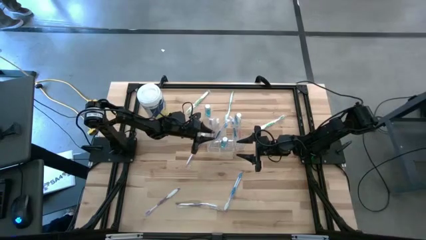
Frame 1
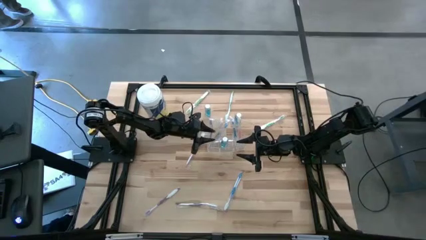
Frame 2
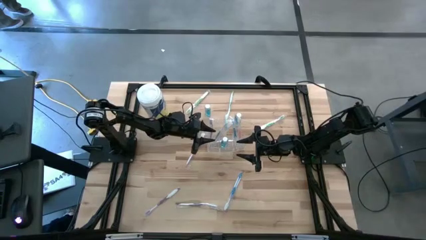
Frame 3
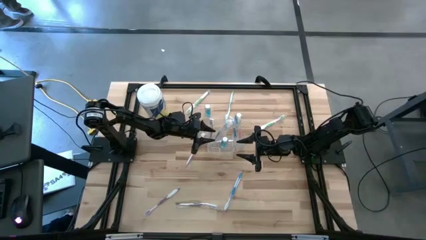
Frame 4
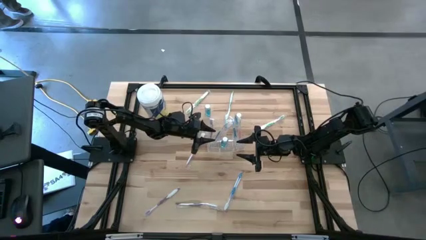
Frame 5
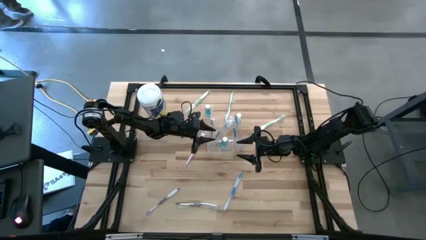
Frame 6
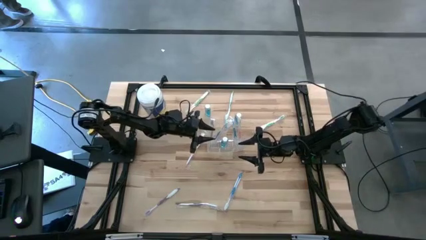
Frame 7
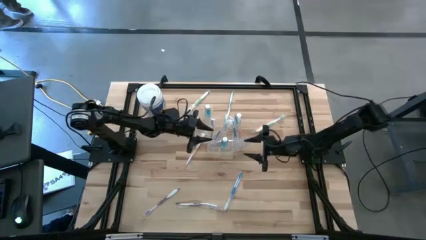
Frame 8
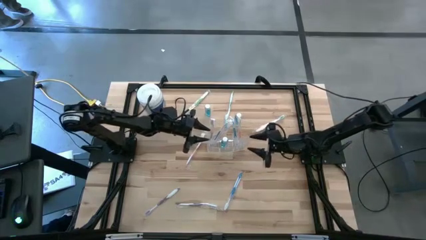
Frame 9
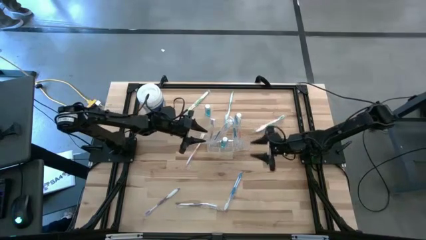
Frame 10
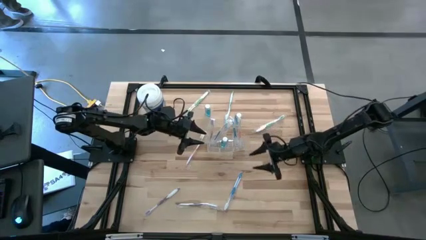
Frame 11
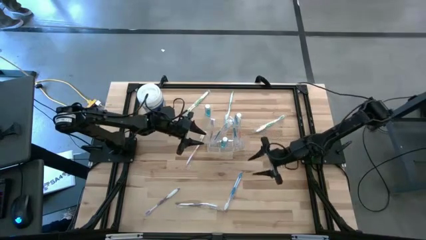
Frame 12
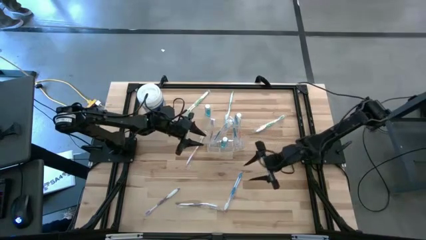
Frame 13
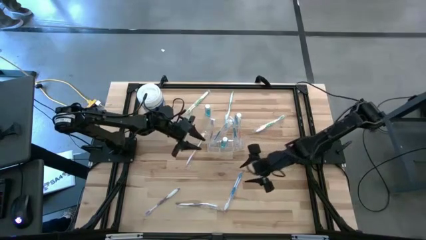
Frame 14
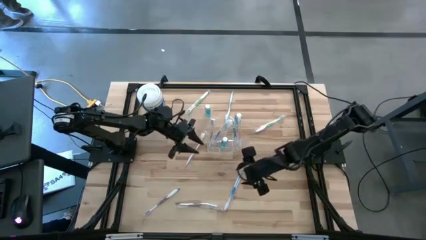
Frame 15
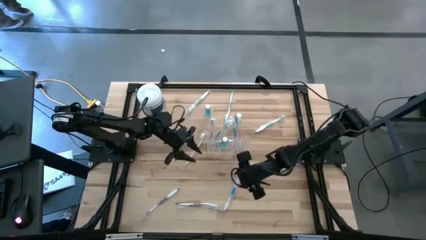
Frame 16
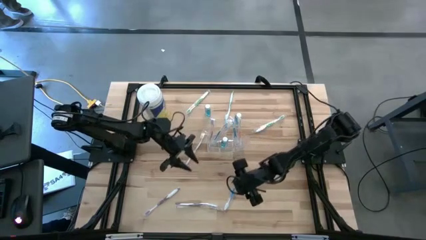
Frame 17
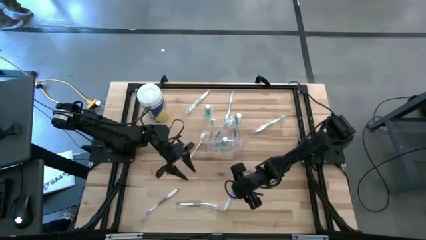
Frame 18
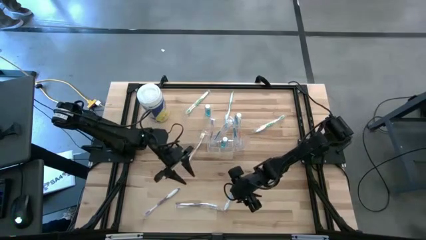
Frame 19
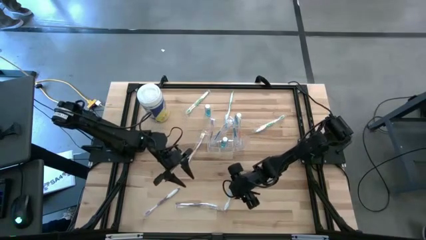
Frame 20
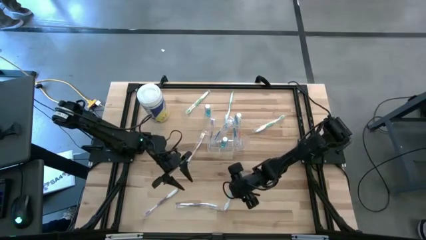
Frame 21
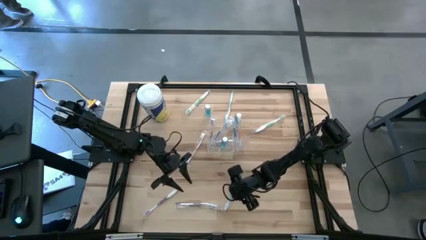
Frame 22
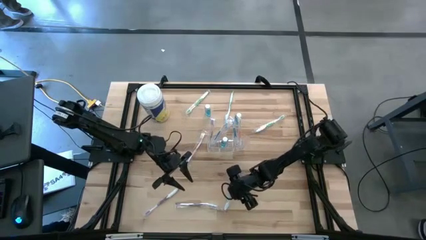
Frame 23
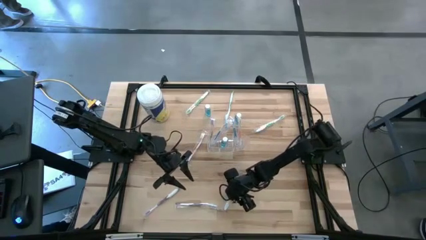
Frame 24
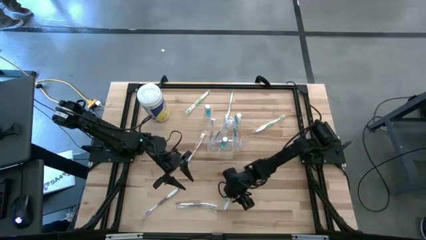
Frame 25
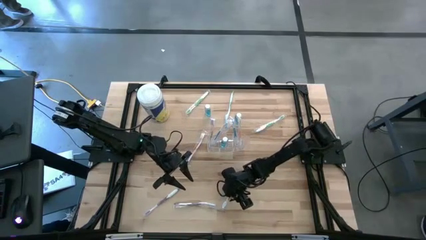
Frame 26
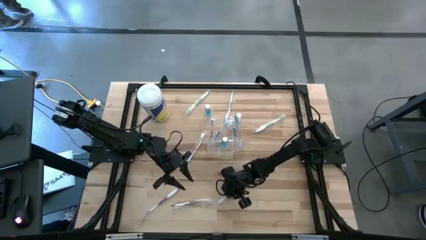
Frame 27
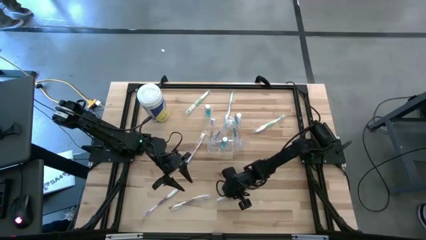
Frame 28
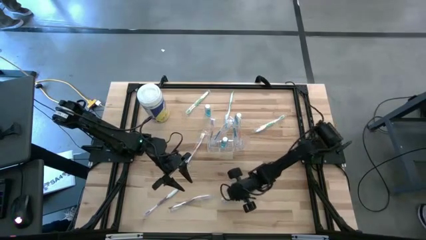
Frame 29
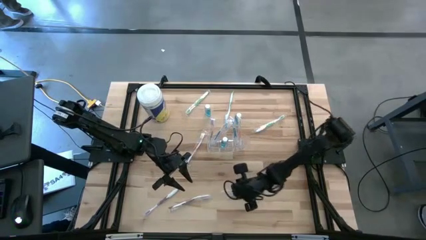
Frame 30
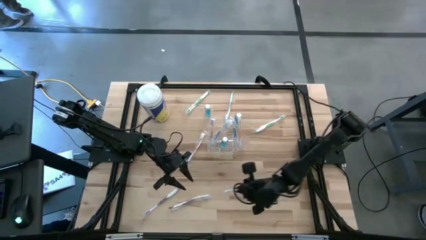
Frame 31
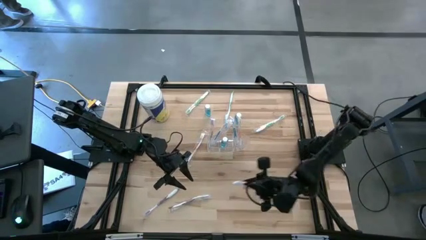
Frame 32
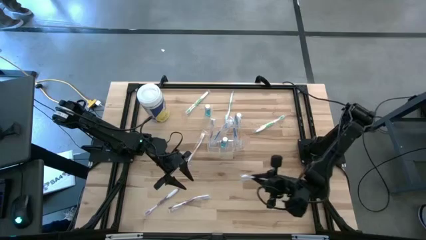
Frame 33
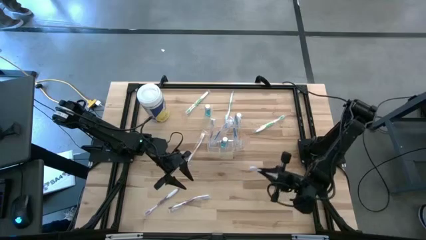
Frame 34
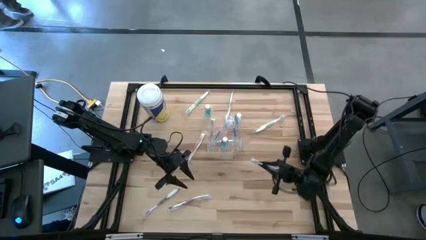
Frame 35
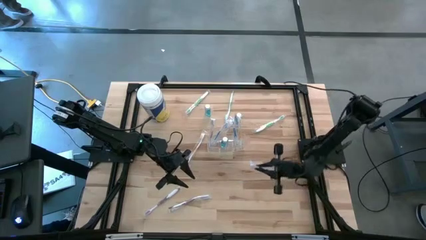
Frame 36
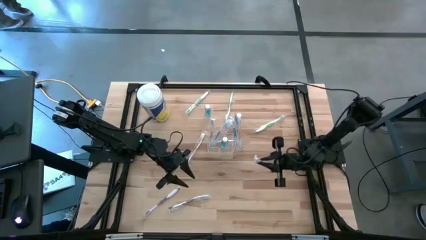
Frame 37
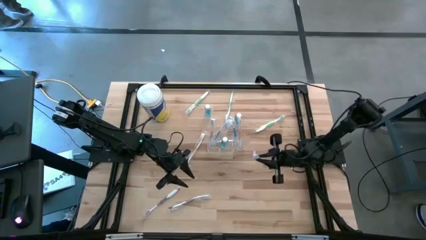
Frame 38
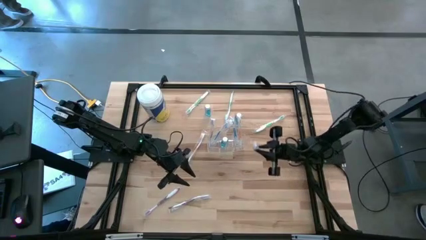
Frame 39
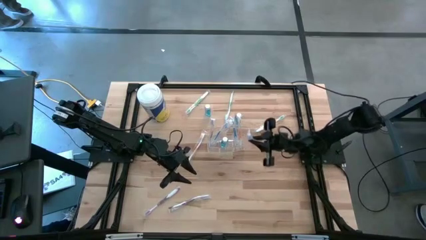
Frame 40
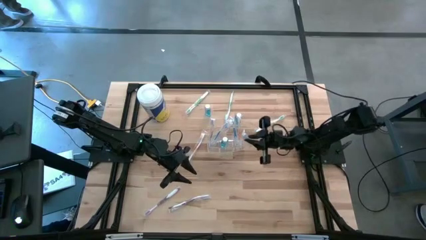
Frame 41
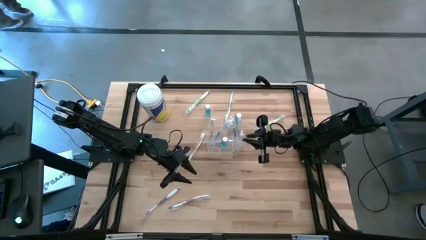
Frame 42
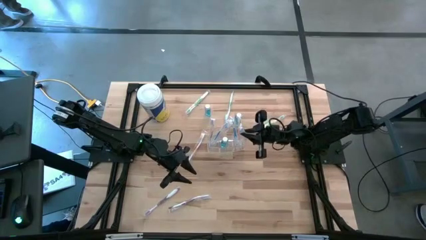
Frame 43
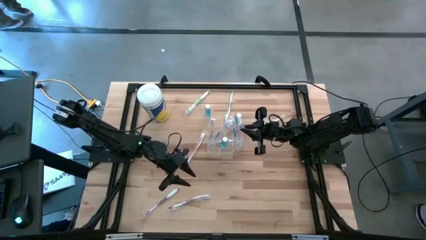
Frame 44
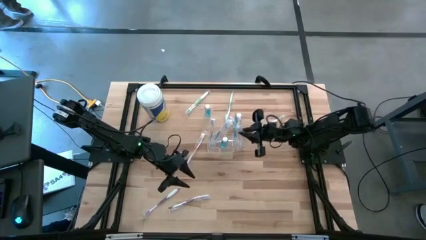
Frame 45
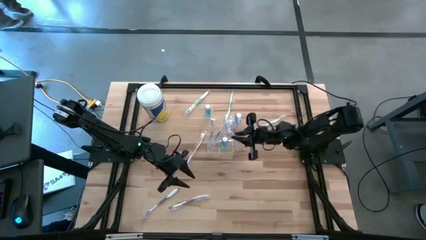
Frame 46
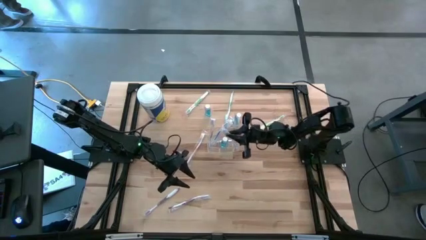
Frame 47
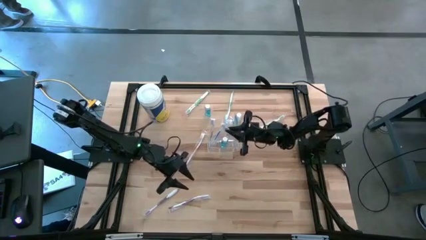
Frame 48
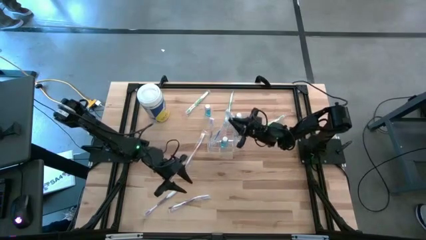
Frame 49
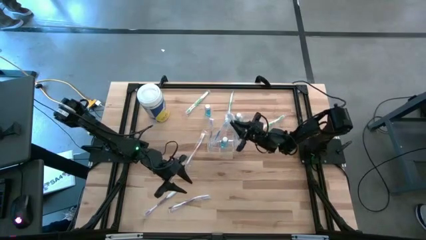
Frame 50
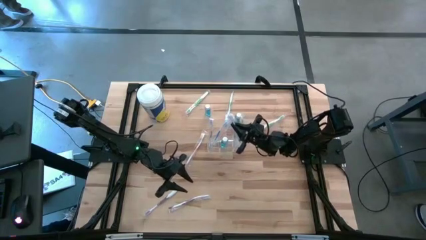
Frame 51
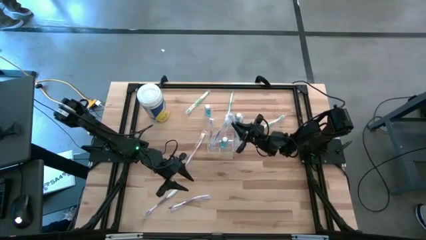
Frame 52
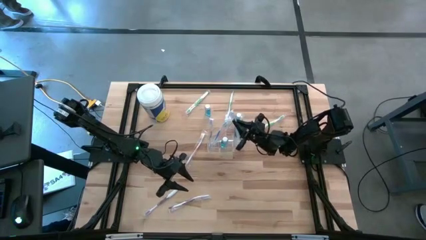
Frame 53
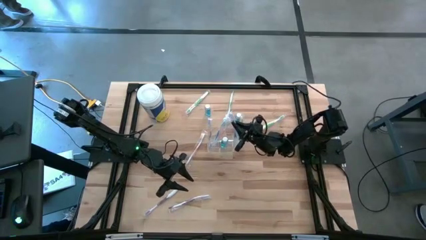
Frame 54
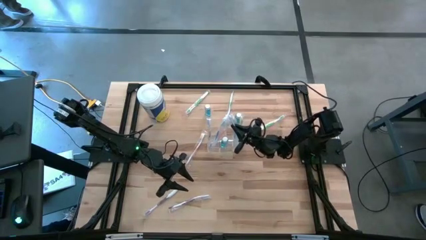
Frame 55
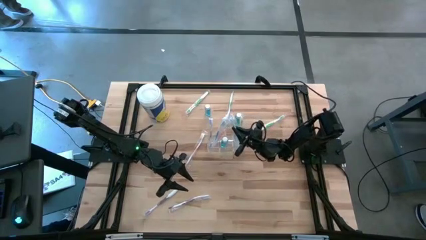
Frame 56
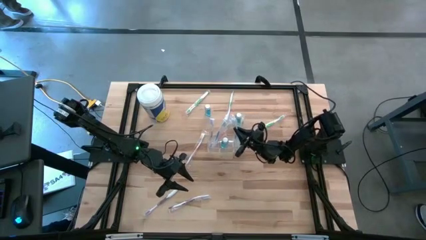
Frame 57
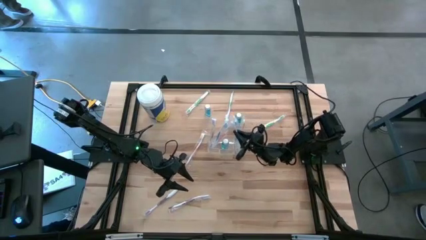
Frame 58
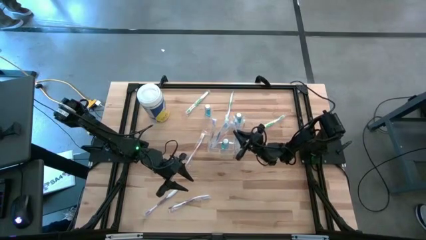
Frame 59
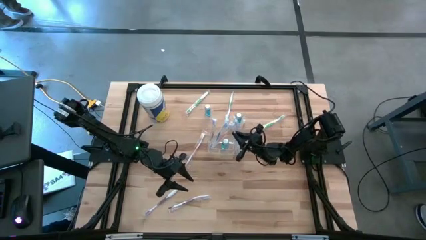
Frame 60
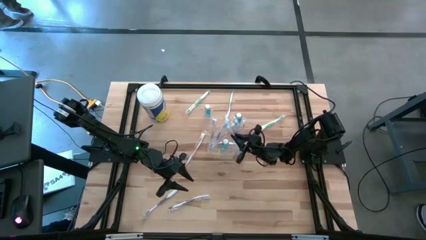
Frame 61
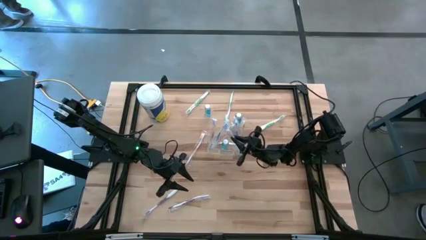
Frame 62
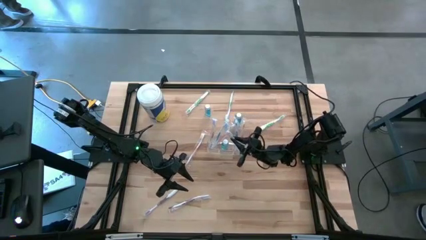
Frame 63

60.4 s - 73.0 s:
Task: Pick & Place toothbrushing station
Put the blue toothbrush into the left section of the transparent organizer
